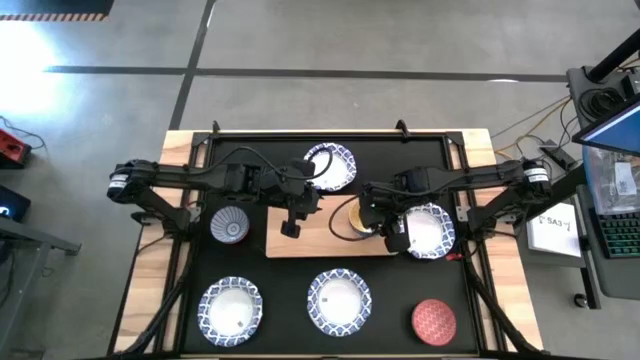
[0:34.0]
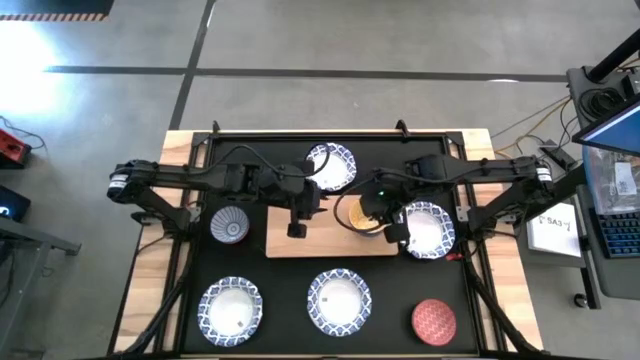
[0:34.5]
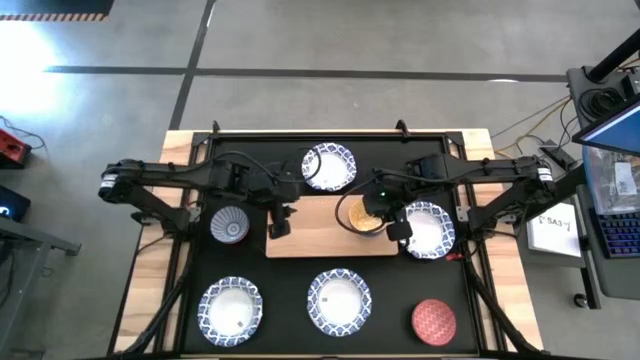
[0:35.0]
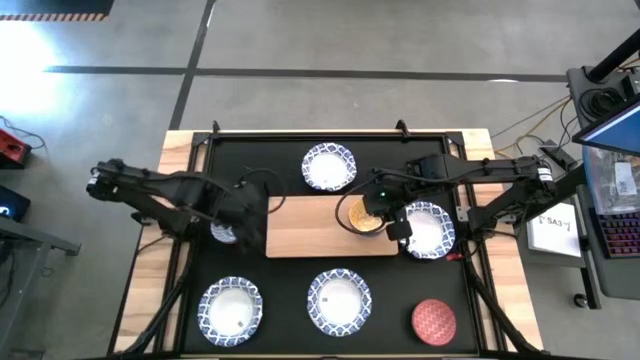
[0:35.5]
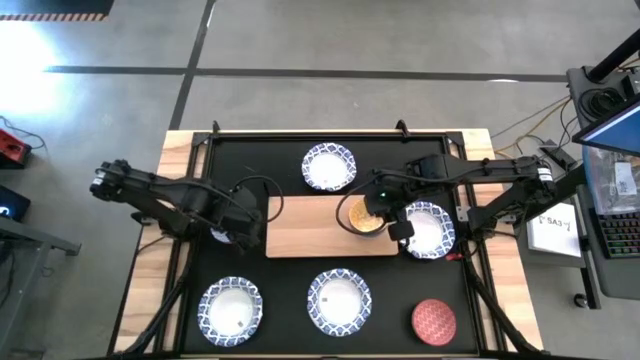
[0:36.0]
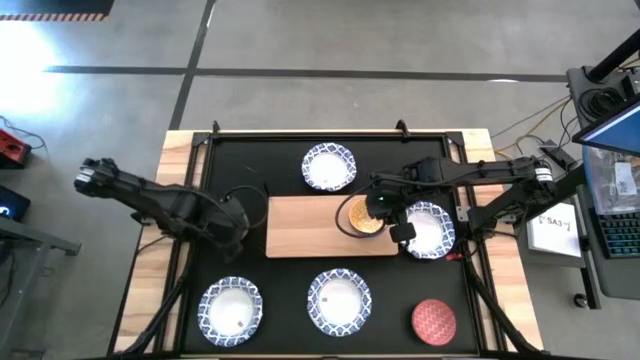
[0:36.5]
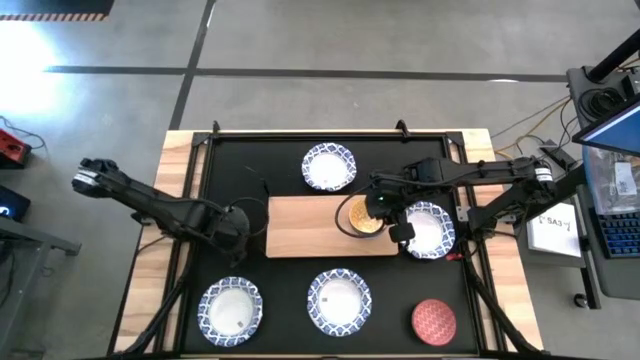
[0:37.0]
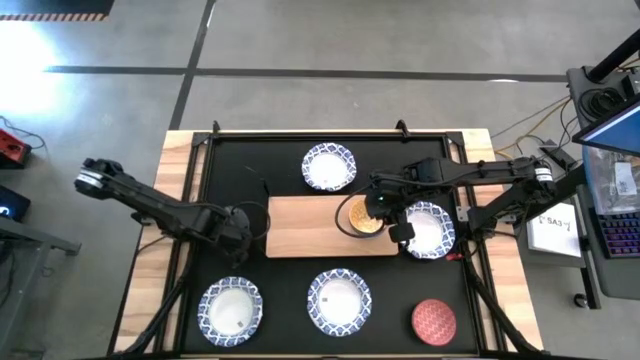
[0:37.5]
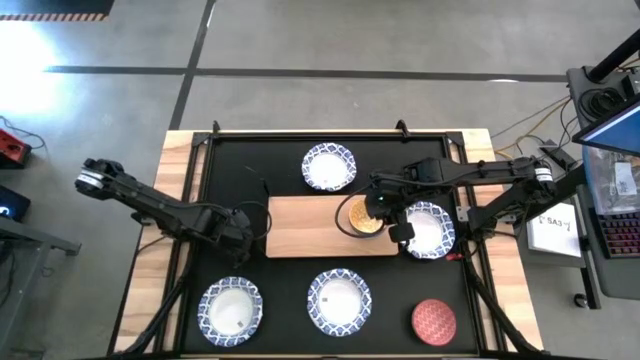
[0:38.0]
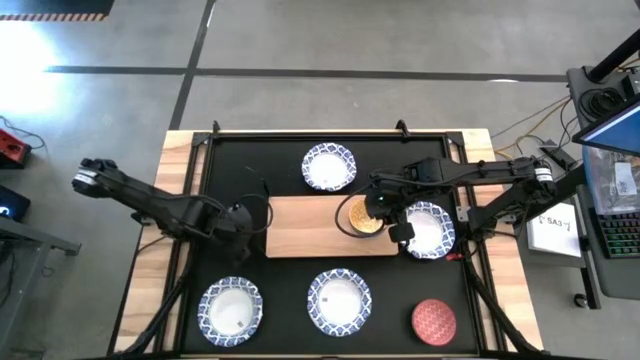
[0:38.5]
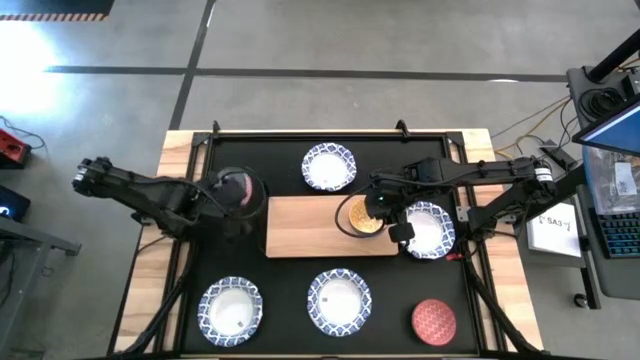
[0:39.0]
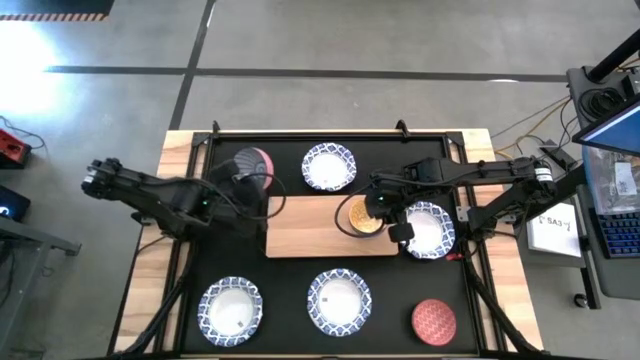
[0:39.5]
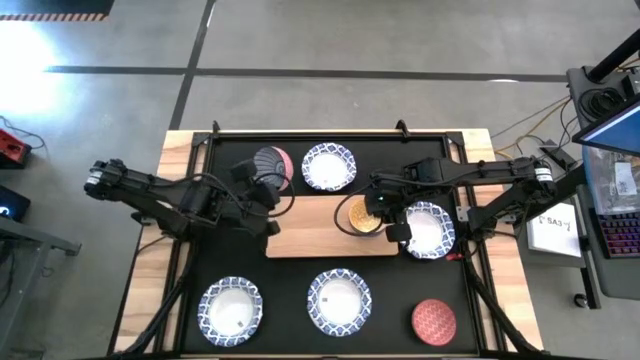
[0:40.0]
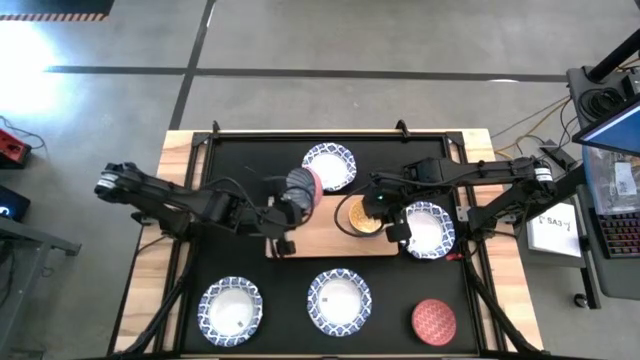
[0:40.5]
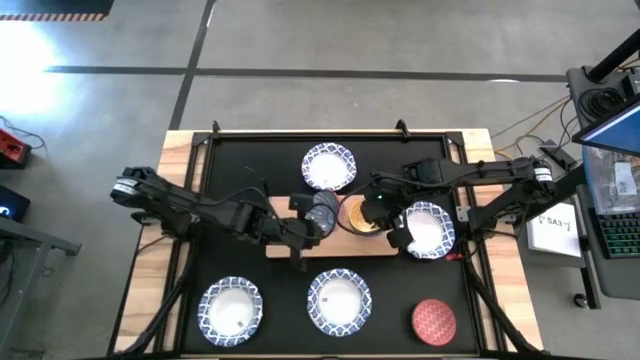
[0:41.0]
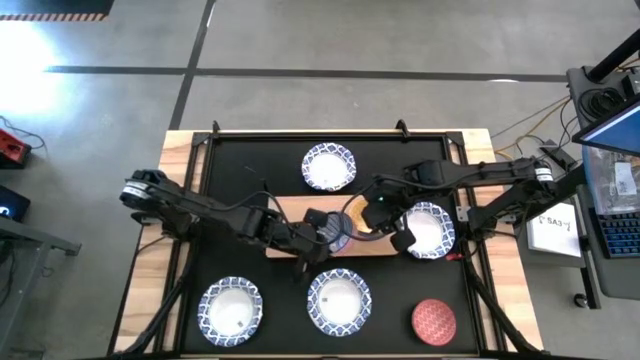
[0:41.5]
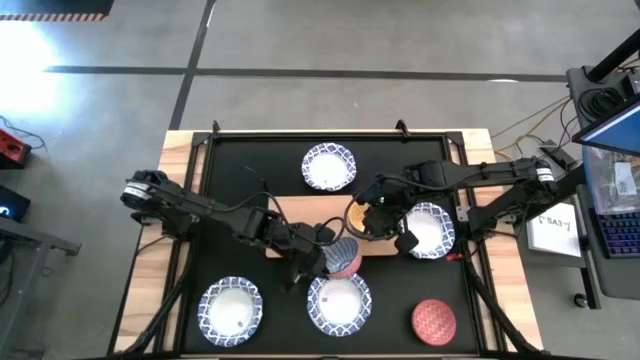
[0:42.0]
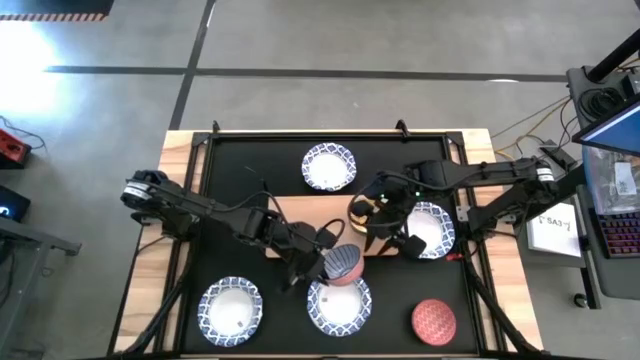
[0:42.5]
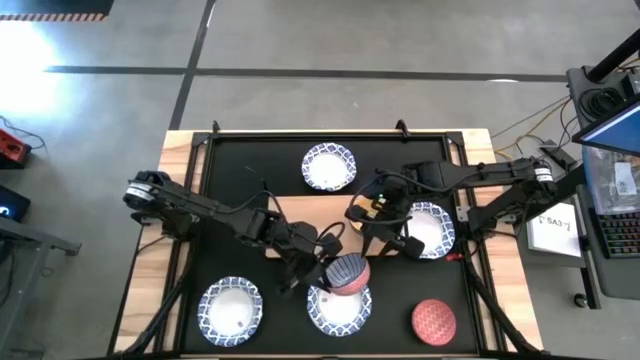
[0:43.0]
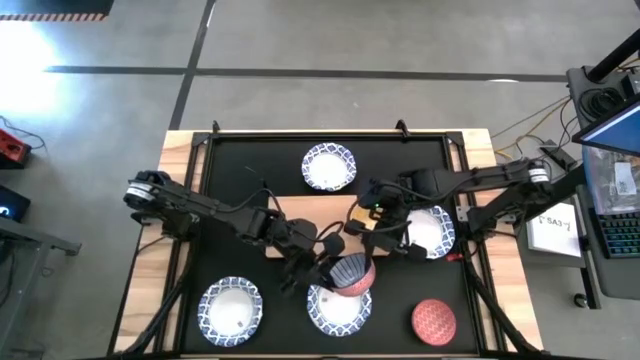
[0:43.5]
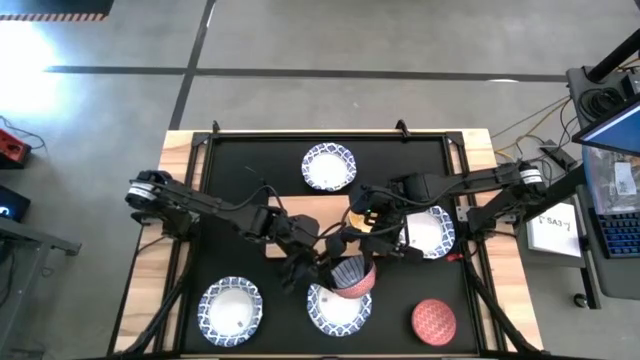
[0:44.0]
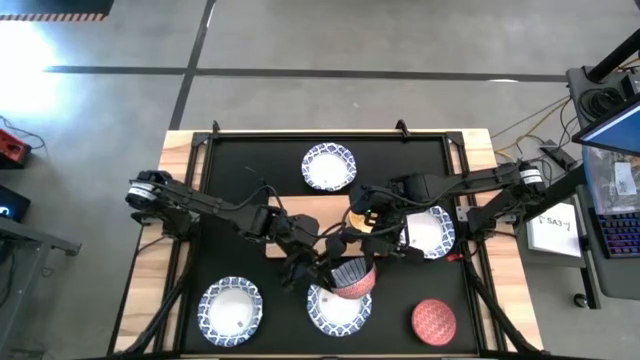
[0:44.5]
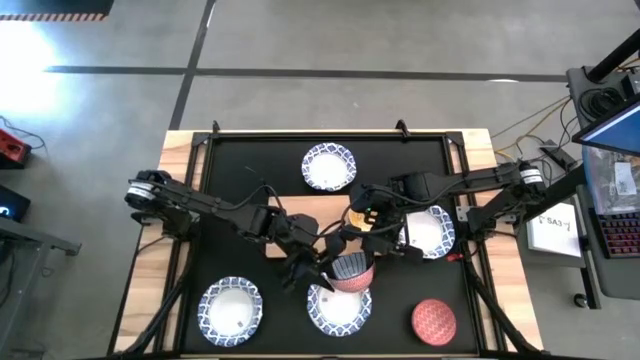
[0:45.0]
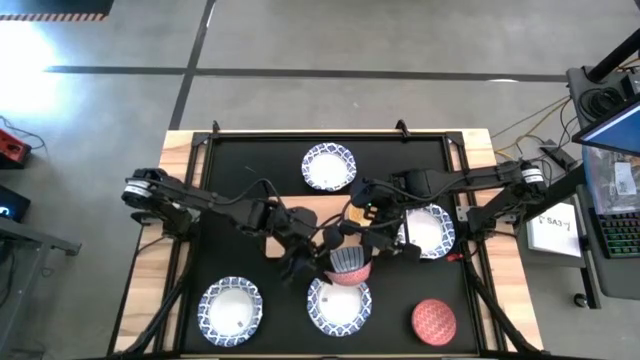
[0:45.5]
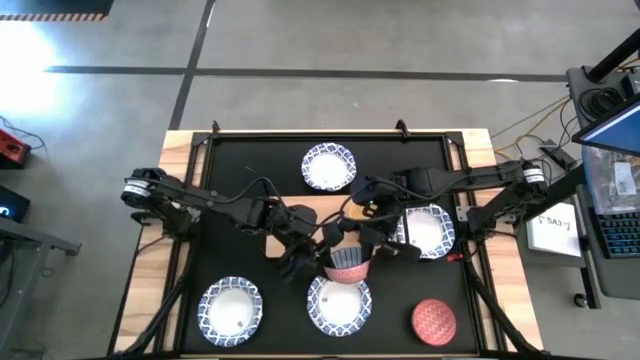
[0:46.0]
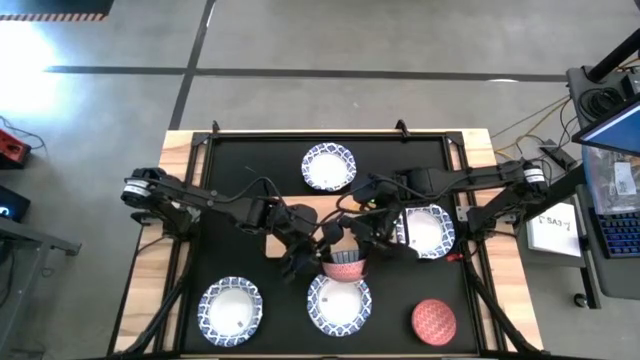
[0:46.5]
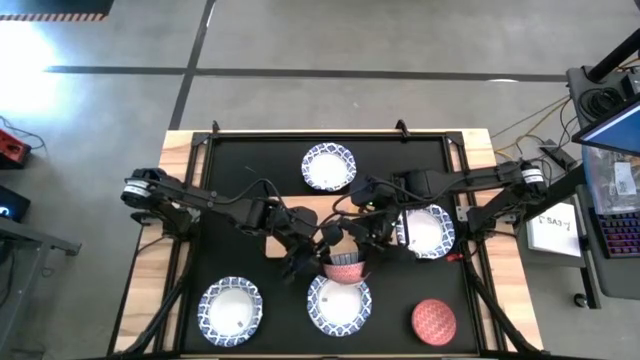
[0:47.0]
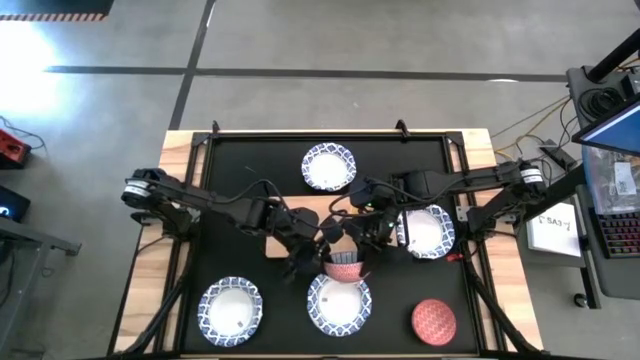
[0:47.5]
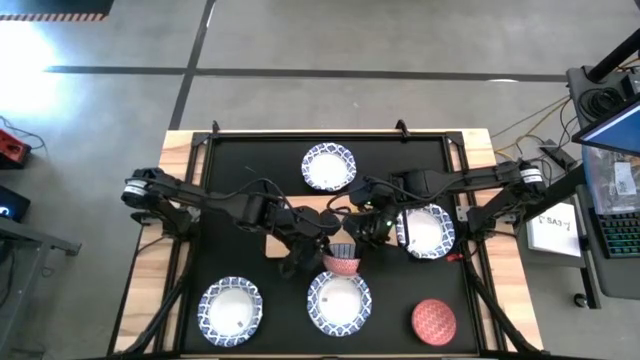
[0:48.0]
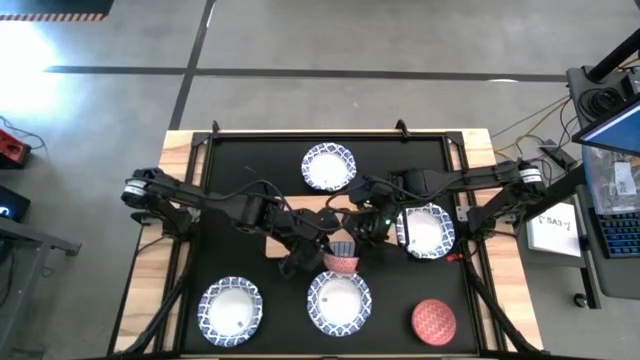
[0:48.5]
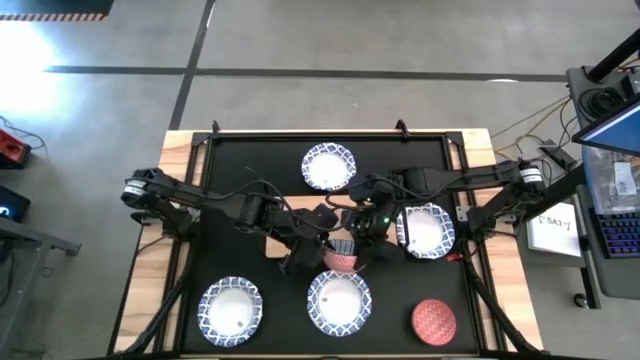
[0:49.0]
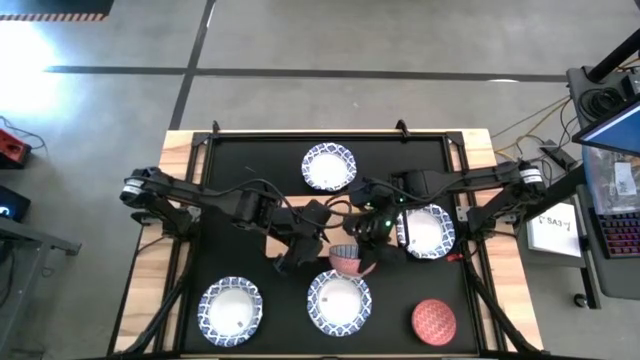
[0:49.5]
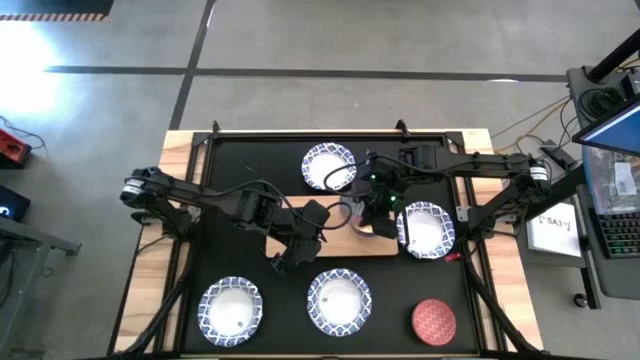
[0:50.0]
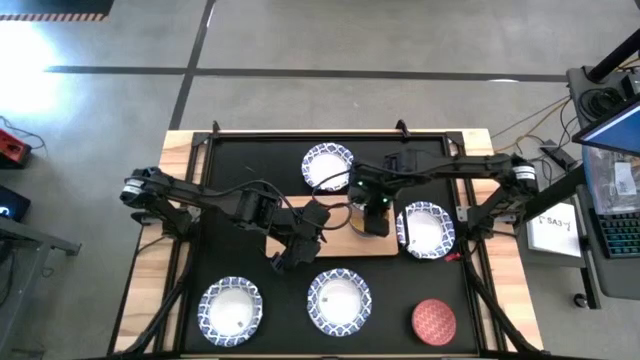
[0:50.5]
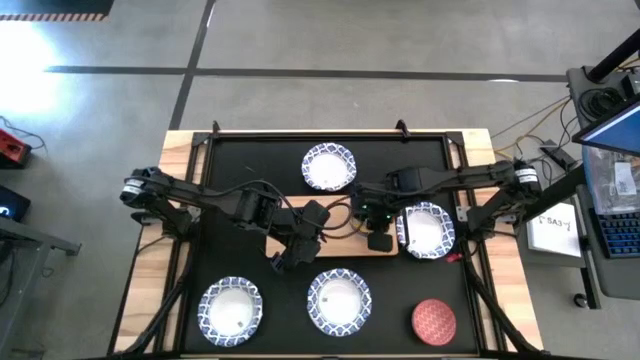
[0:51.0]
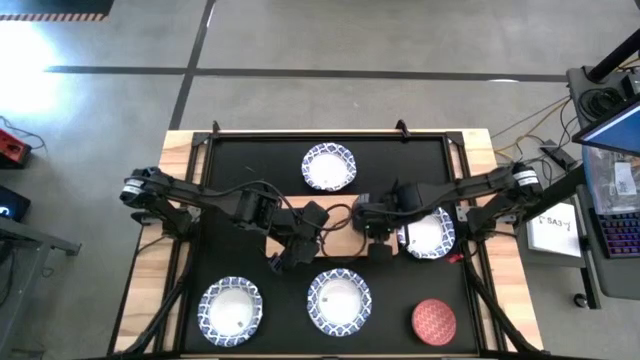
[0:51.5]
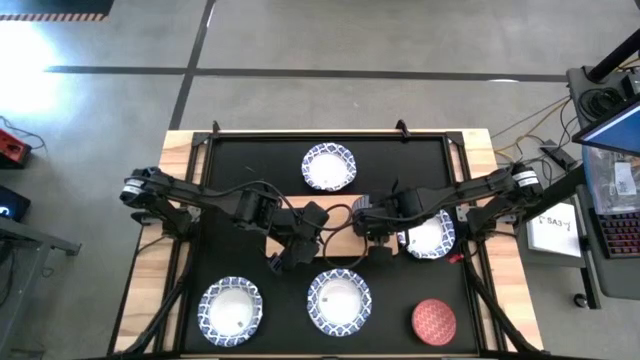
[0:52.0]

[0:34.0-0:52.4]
Task: Place and stack bowls onto a shelf
Stack the small dark blue and red patterned bowl on top of the small yellow and dark blue patterned bowl

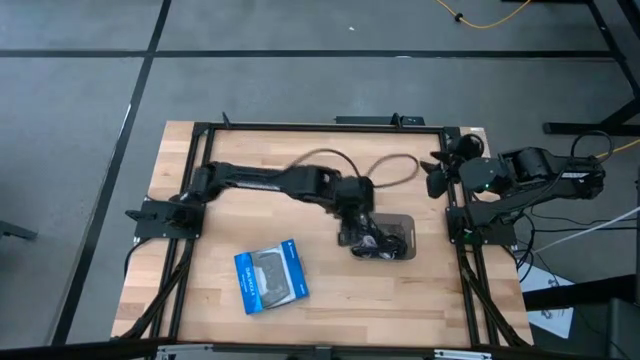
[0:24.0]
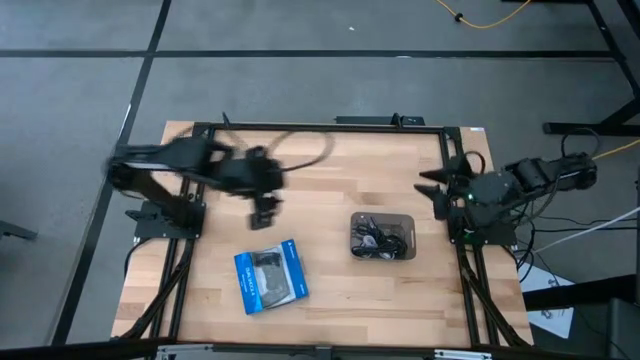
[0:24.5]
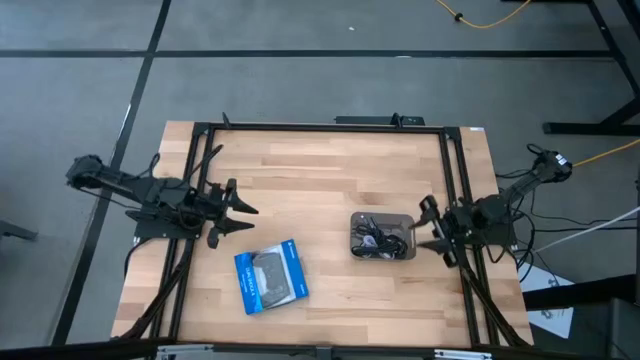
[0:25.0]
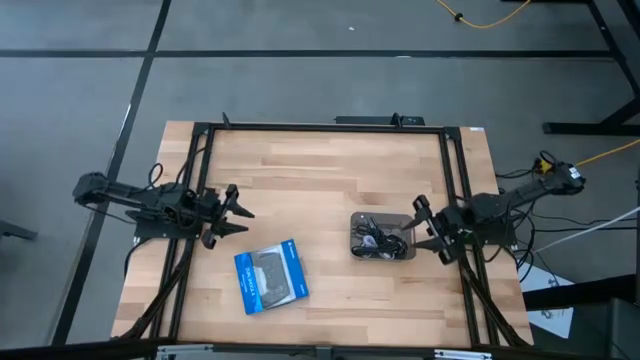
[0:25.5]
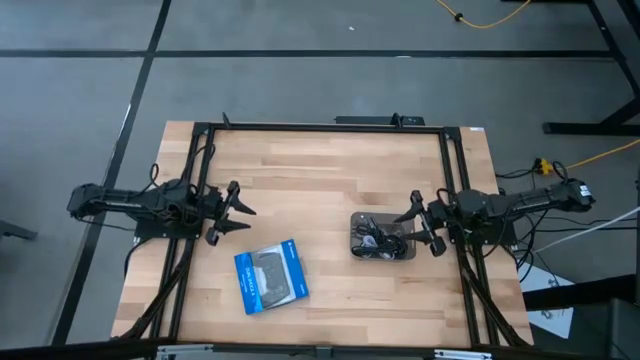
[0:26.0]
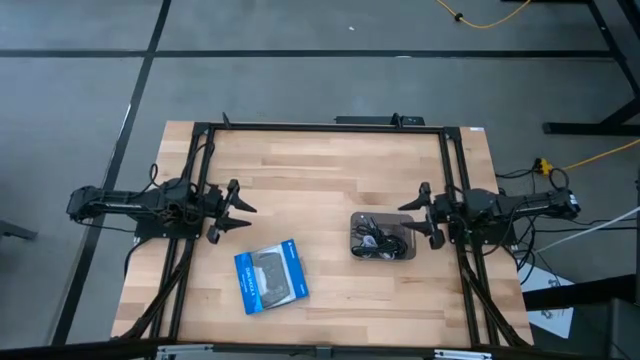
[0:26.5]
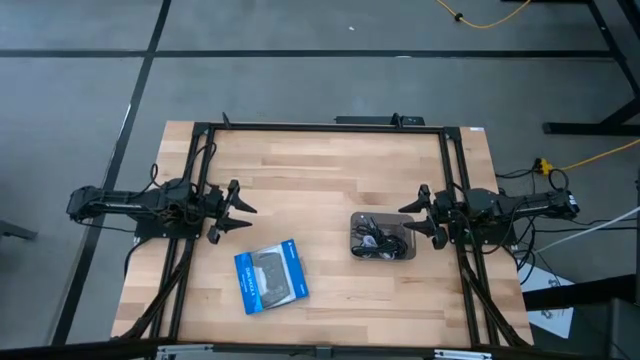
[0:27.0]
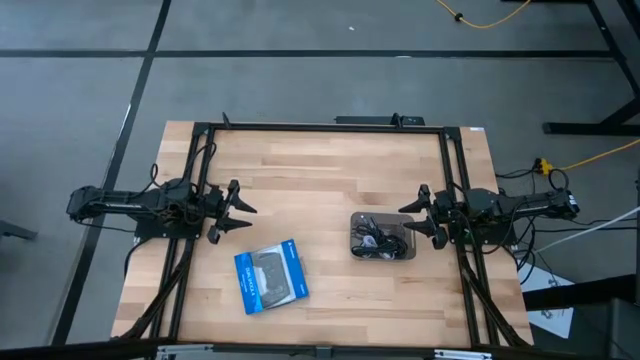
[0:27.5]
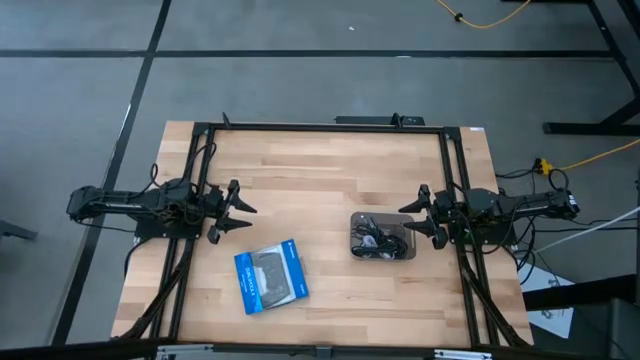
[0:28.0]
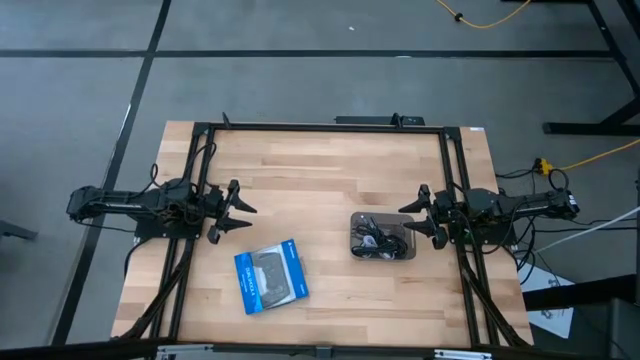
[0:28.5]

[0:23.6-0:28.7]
Task: Pick and place USB-C Cables
Return to Home Position
